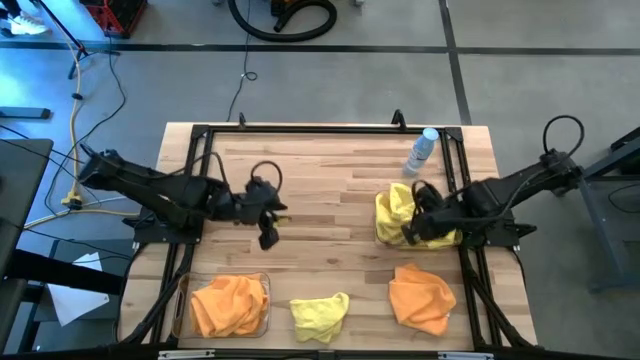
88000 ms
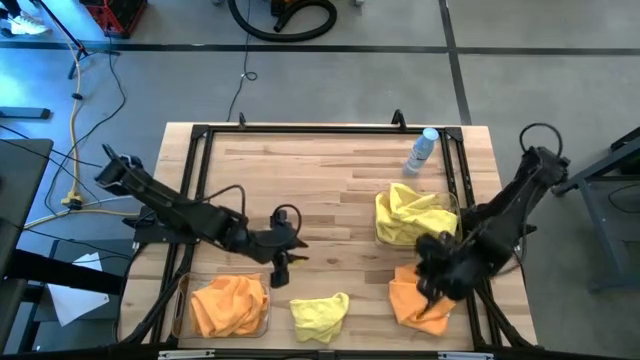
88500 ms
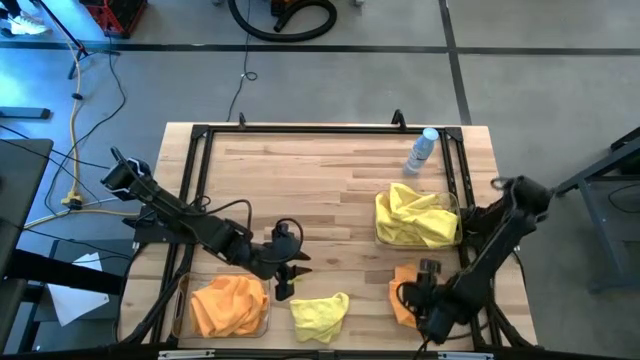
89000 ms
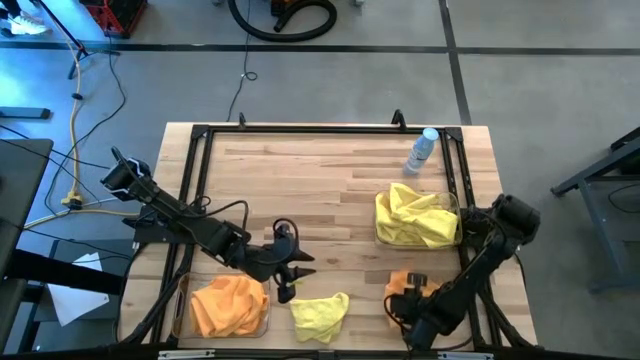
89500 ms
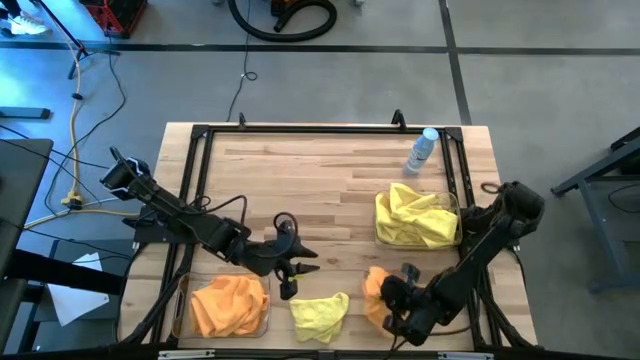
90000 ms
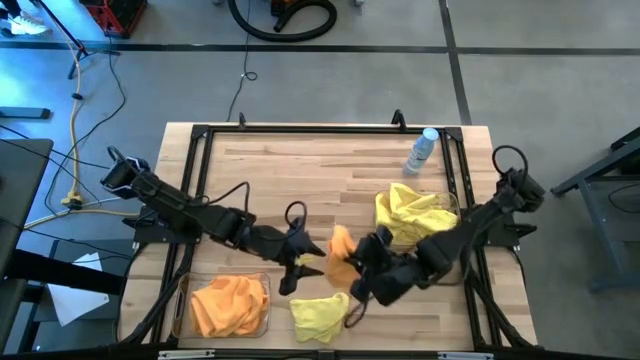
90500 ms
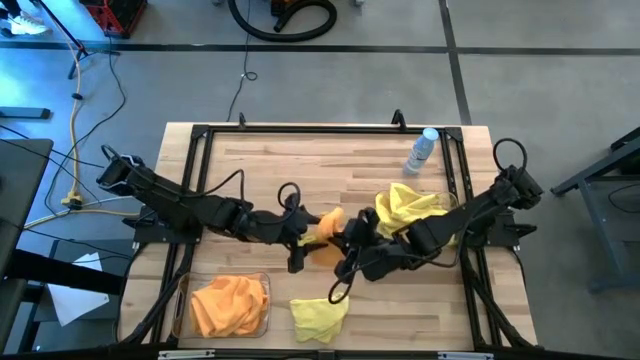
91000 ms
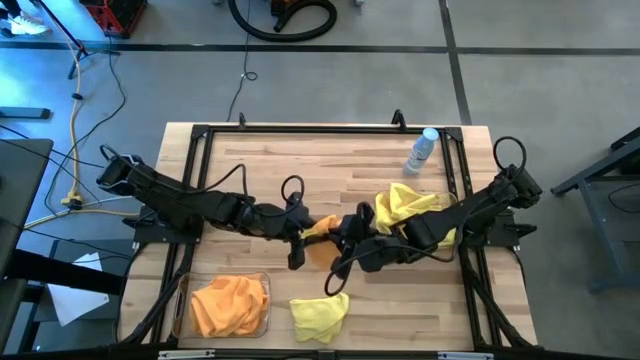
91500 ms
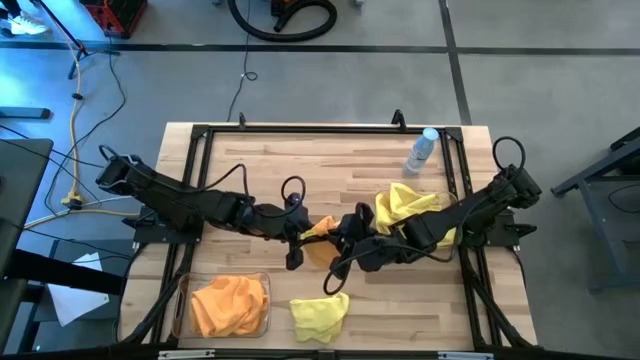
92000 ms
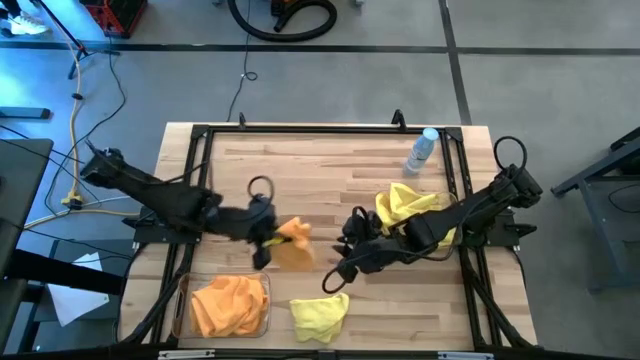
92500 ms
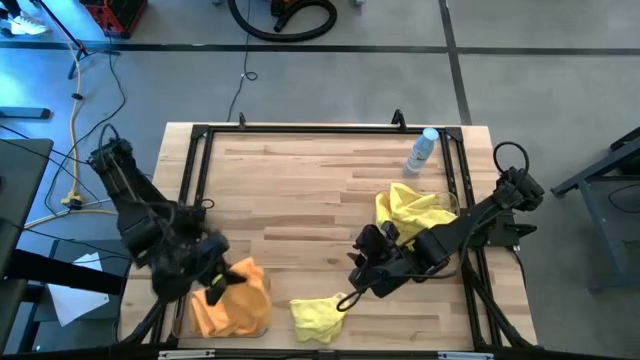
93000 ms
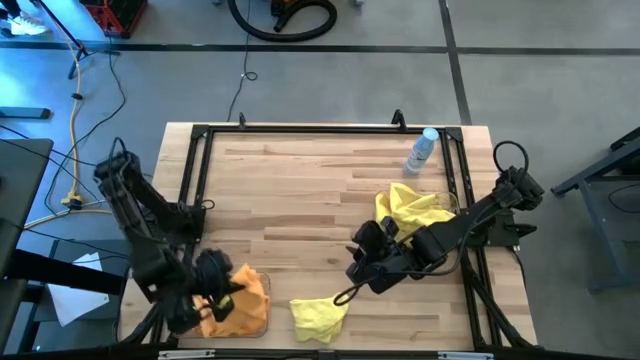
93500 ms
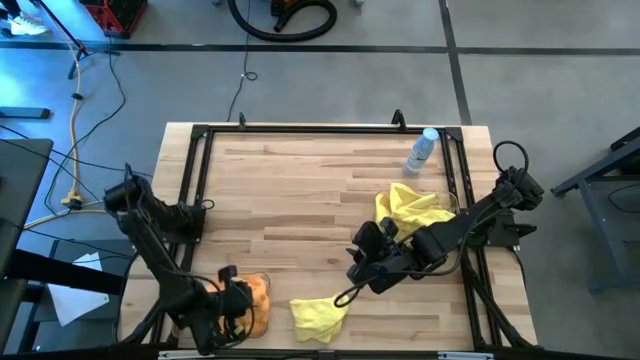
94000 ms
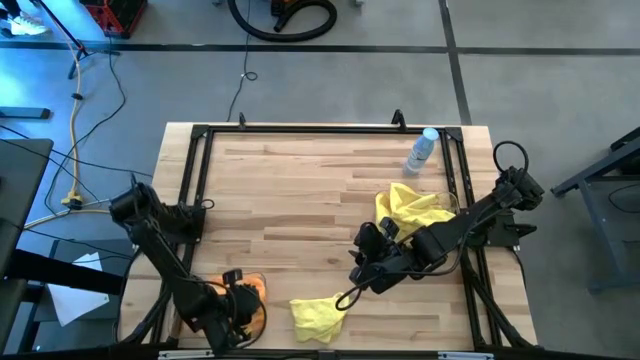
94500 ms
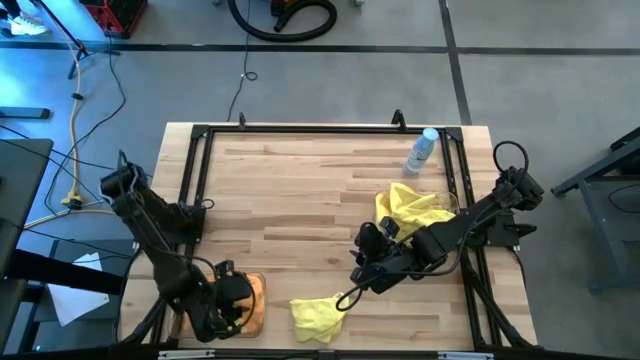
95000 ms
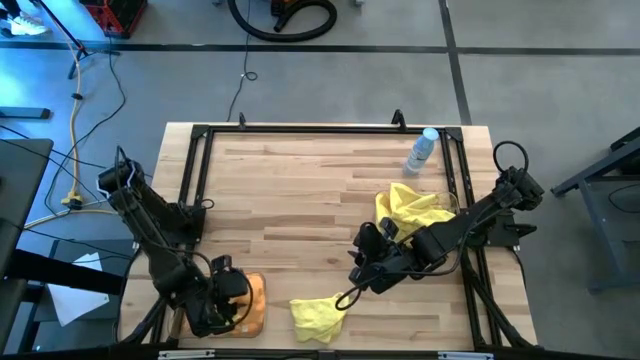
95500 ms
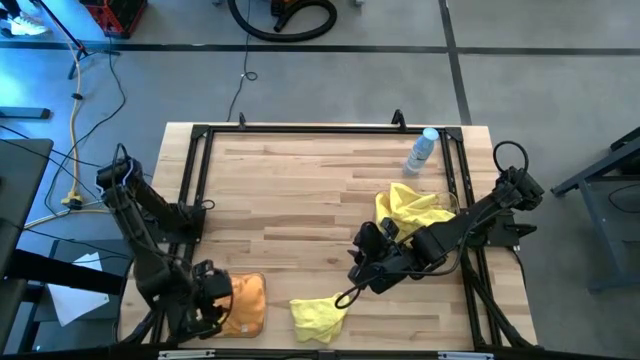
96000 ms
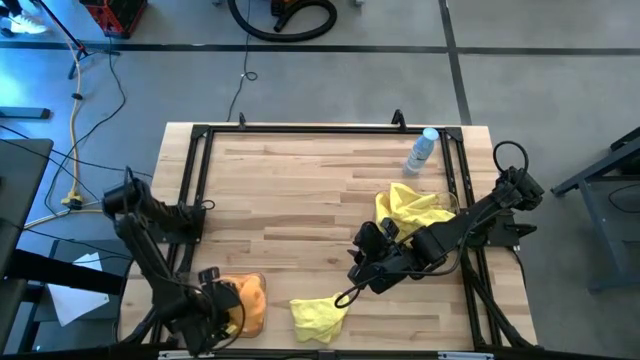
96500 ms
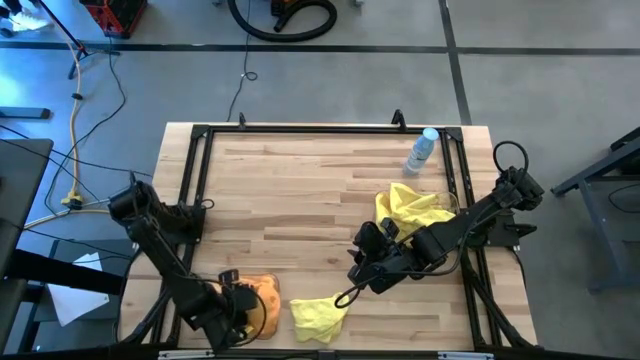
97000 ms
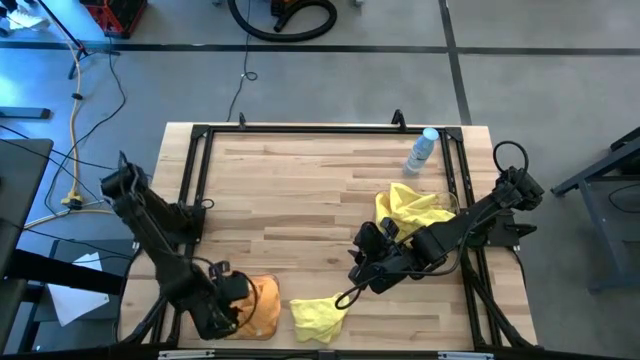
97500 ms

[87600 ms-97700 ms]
Task: Sort microfiber towel by color & place in baskets
Put the orange microfiber cloth into the right transparent bin

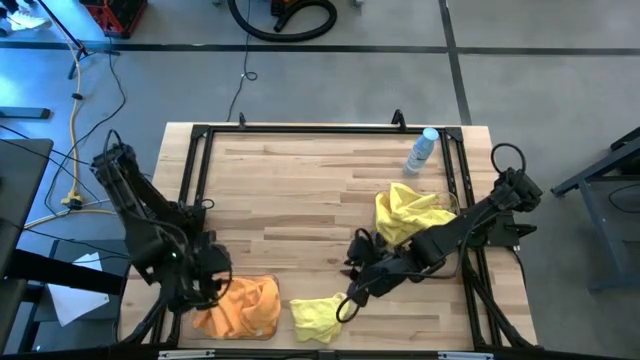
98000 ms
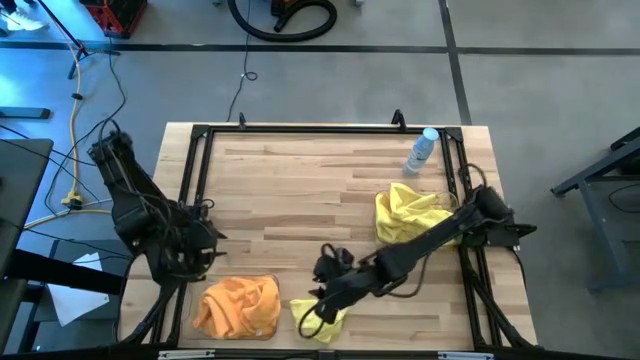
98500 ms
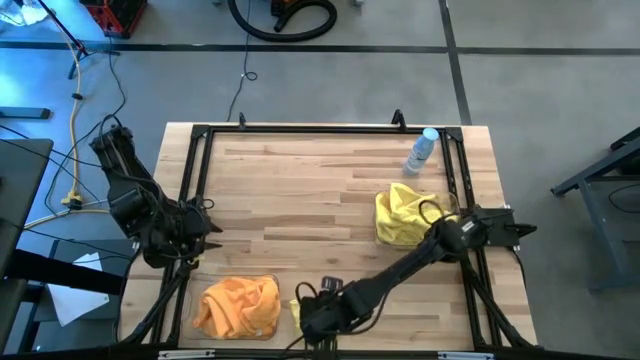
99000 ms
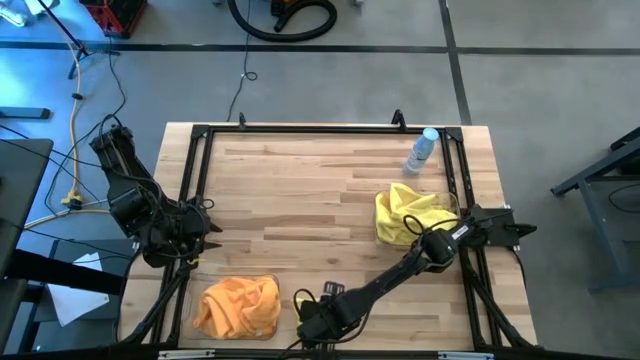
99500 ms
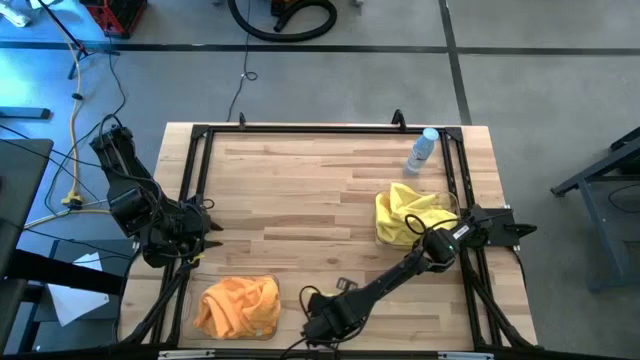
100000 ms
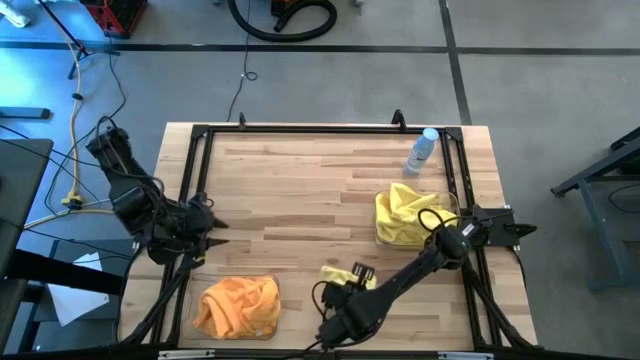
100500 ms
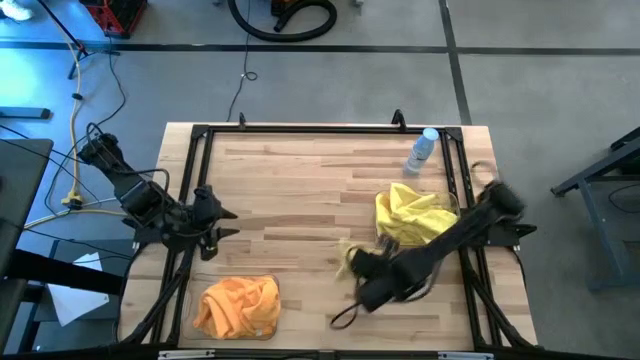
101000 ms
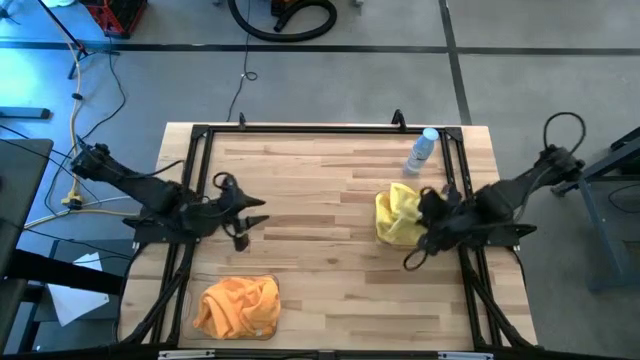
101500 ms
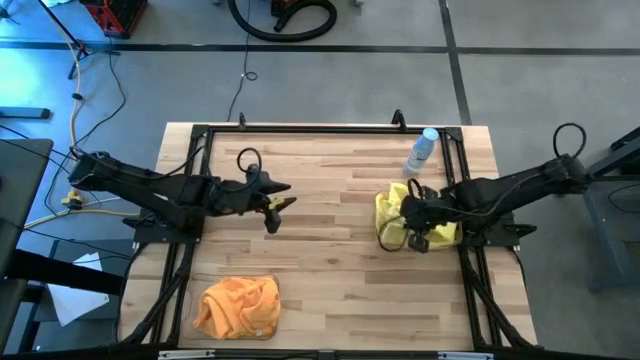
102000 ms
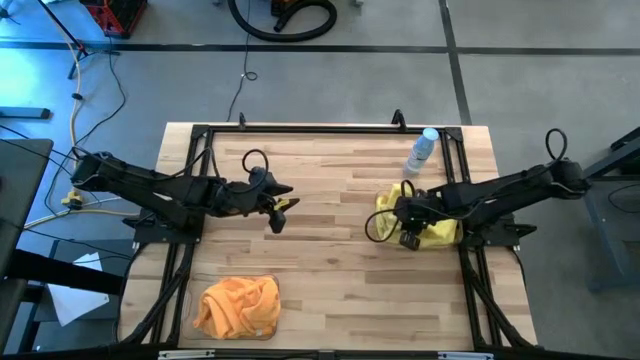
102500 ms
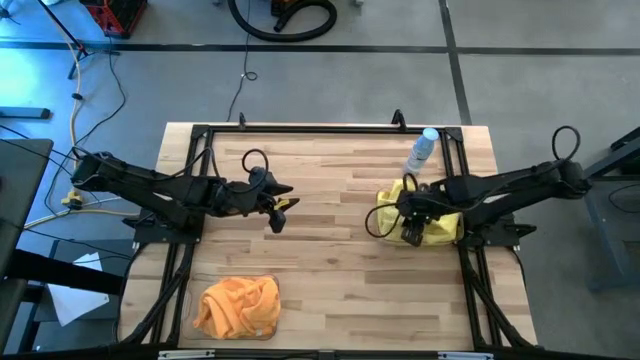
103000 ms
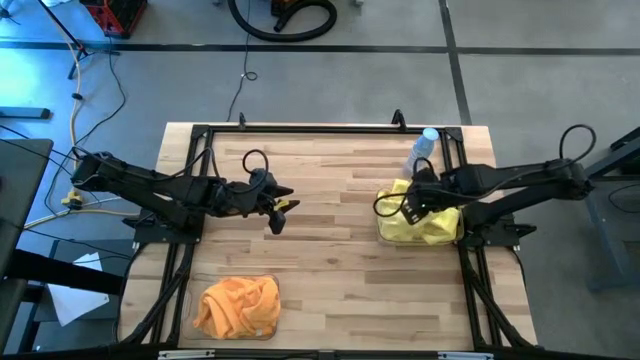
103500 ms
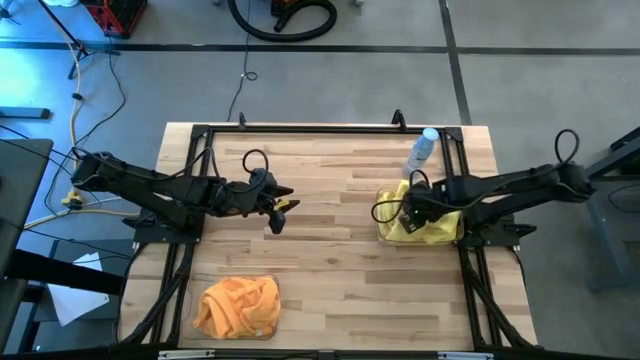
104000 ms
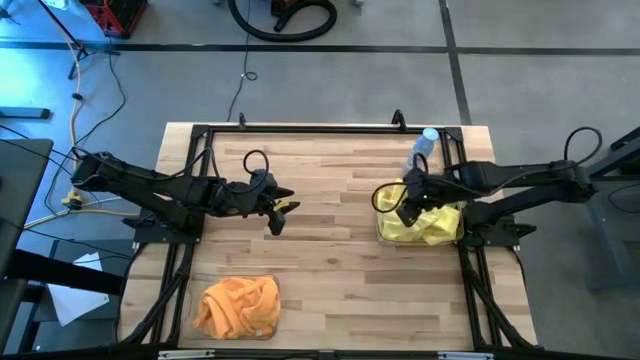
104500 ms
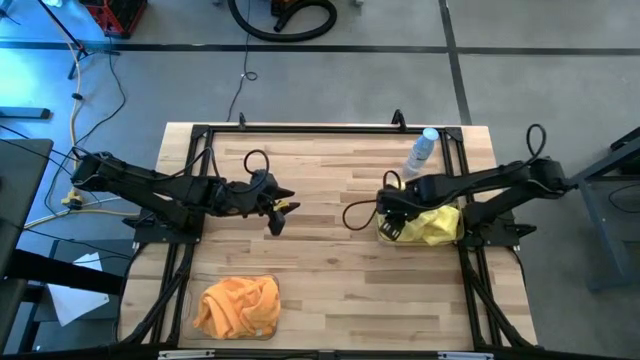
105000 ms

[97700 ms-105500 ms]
Put the yellow microfiber cloth into the left transparent bin

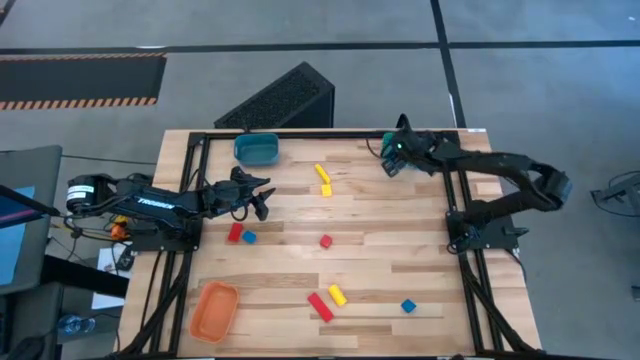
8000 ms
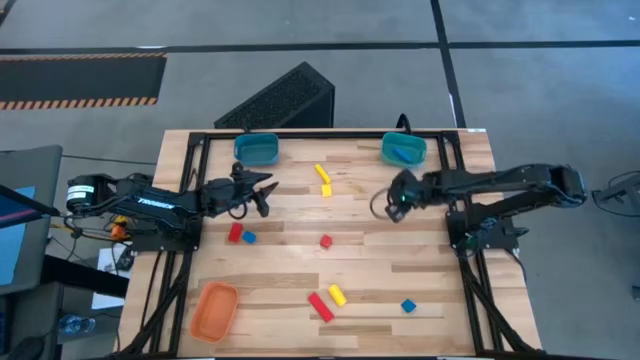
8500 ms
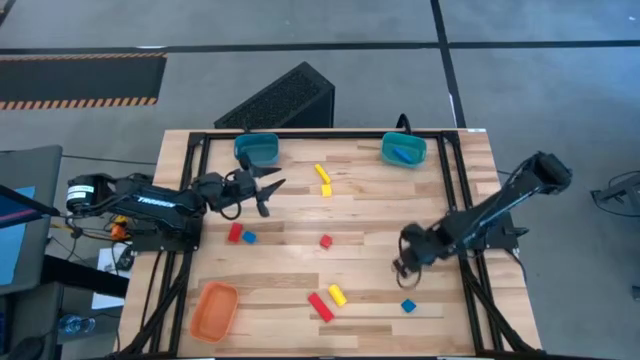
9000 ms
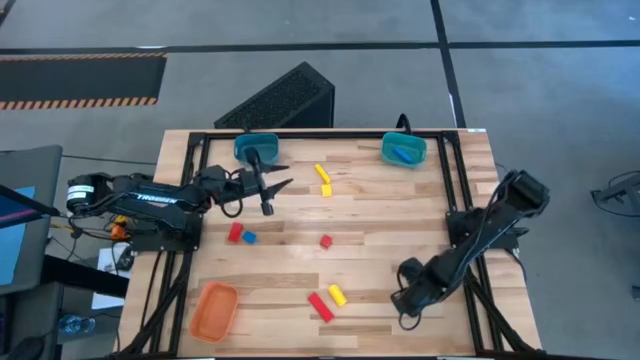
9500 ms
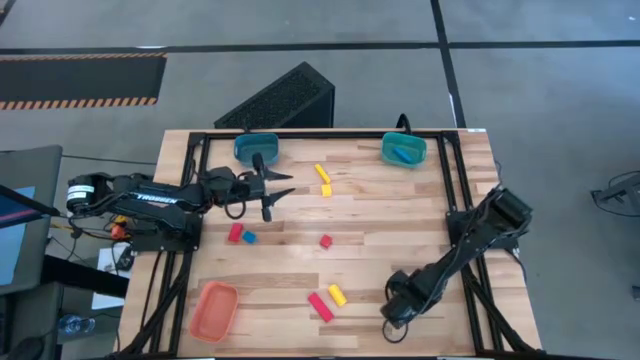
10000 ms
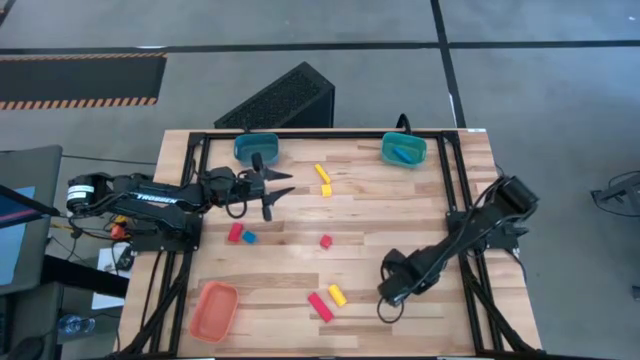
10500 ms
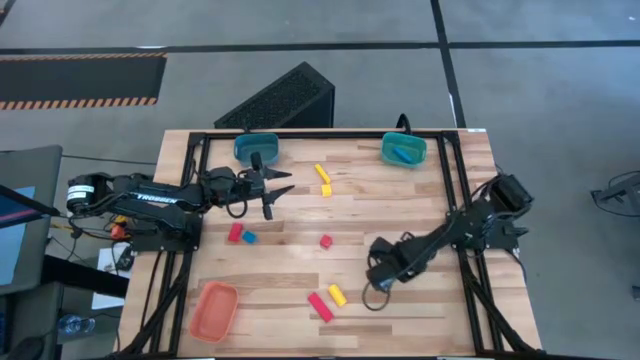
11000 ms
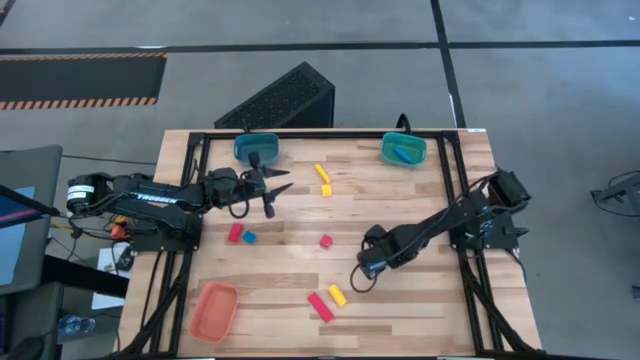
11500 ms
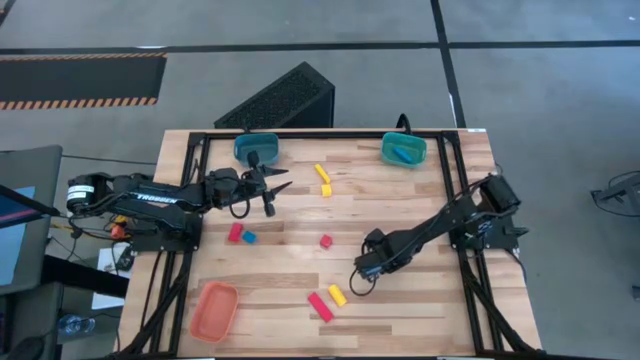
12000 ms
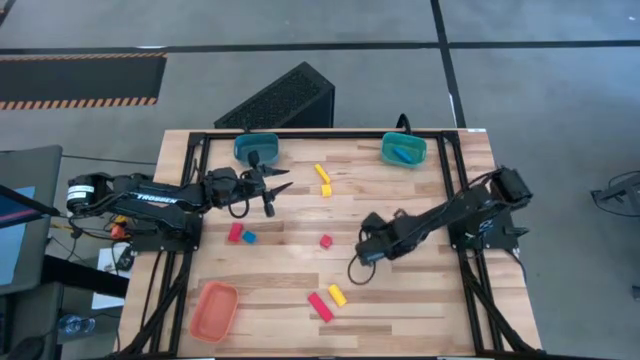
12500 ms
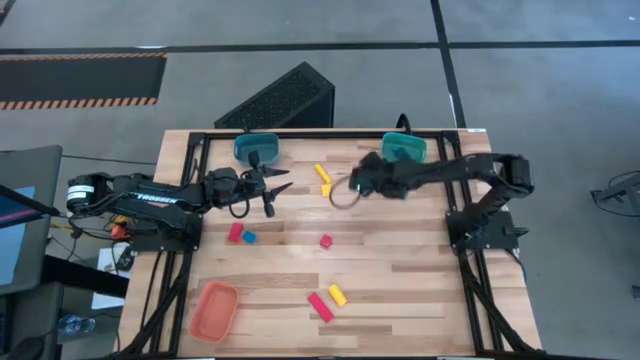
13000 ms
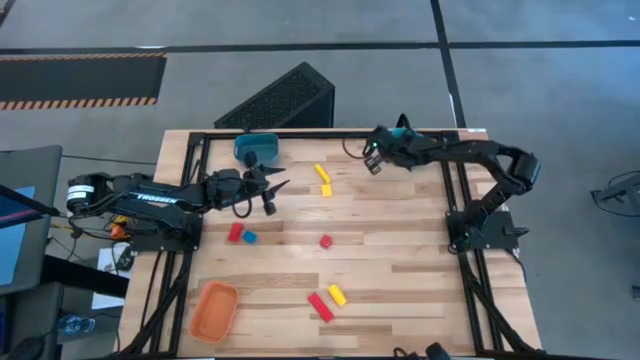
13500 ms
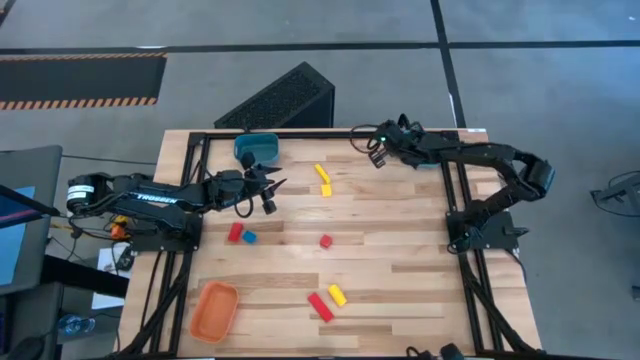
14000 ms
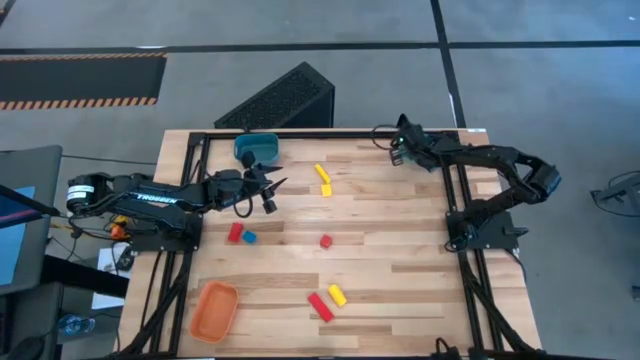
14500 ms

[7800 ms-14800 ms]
Task: Sort & place blocks by color
Put the bottom blue block into the green bin
